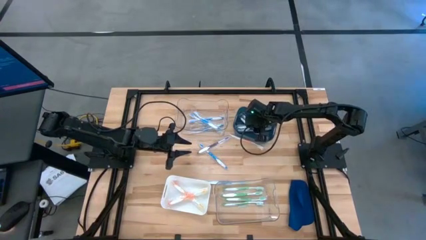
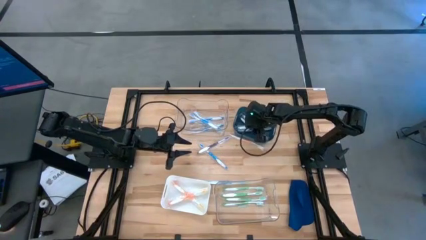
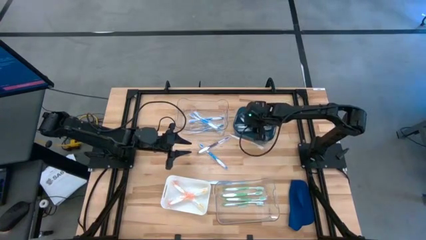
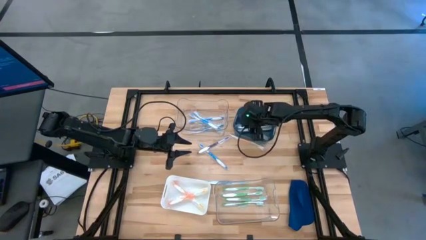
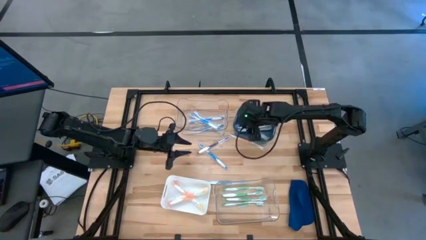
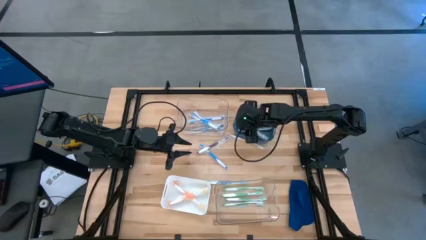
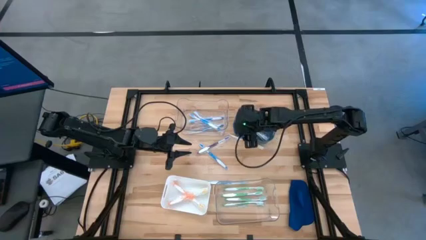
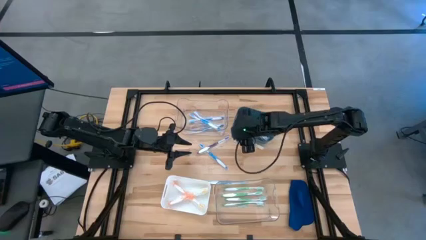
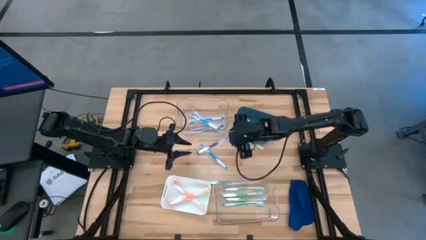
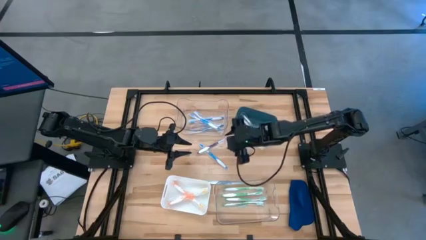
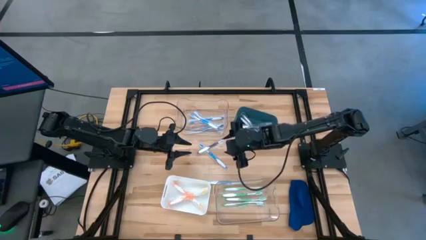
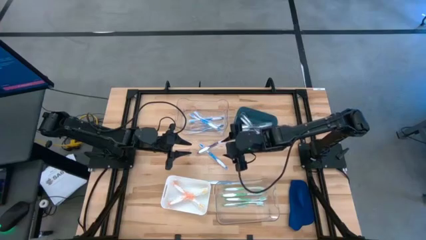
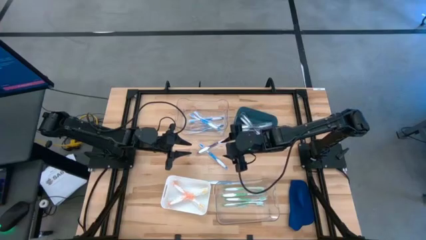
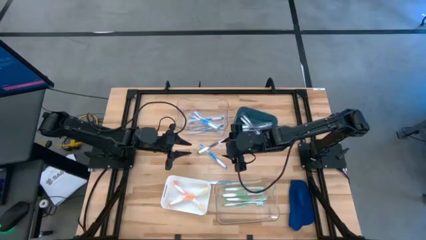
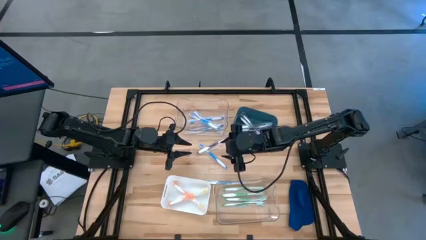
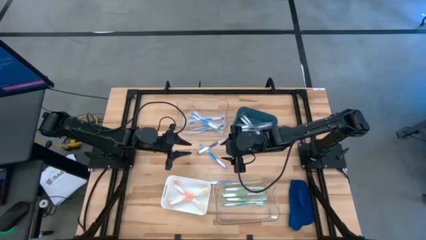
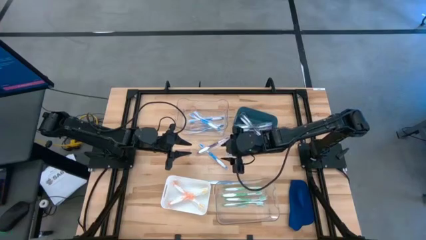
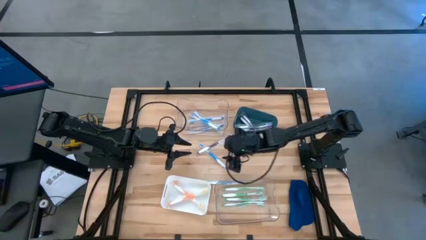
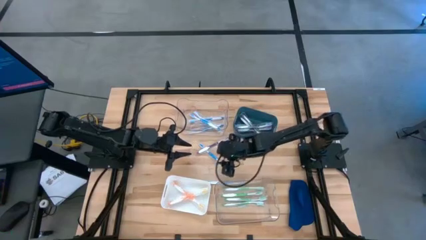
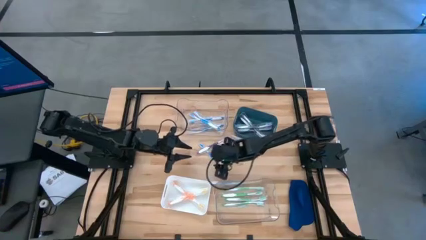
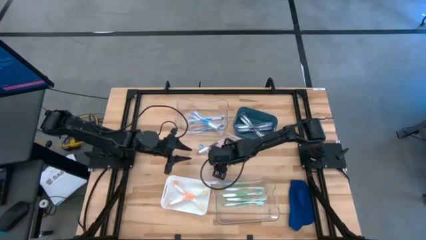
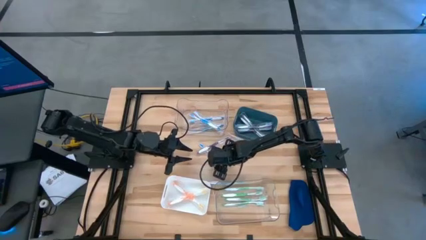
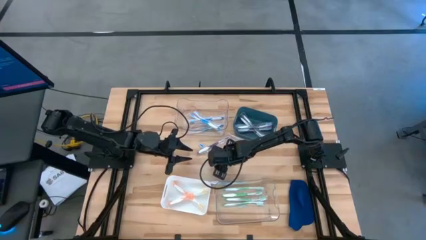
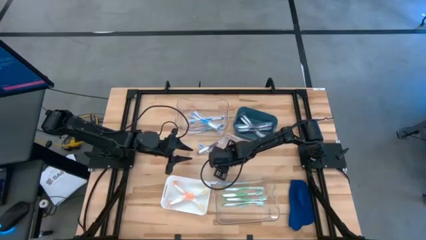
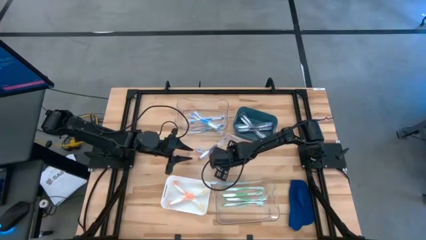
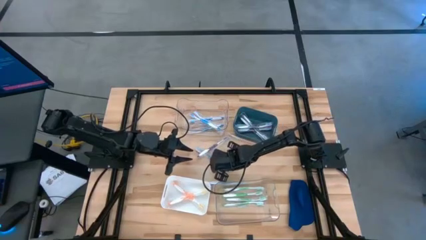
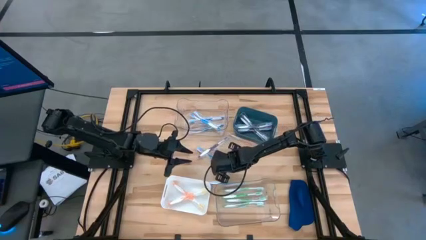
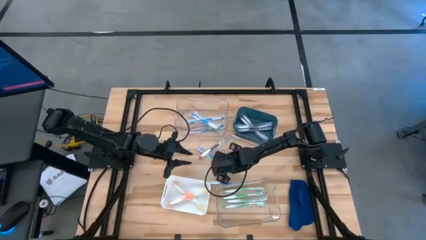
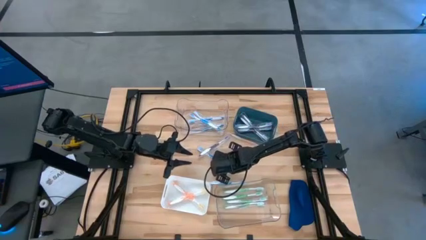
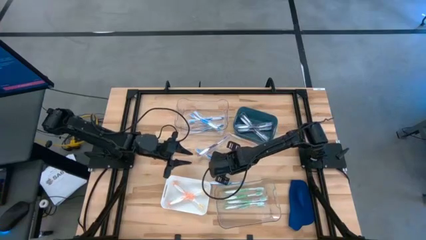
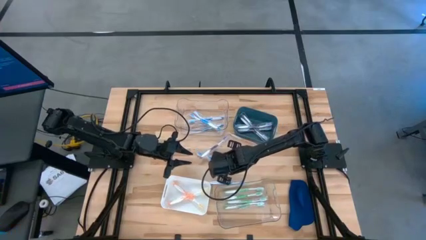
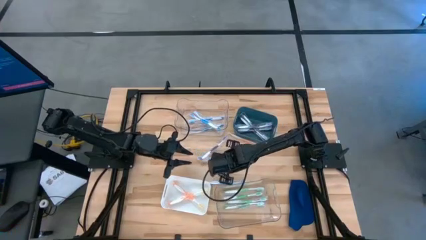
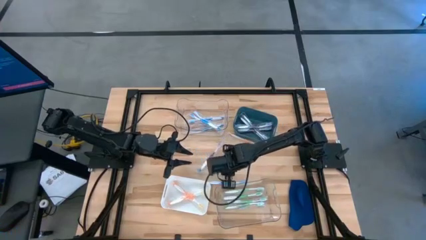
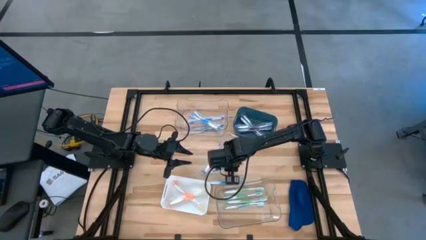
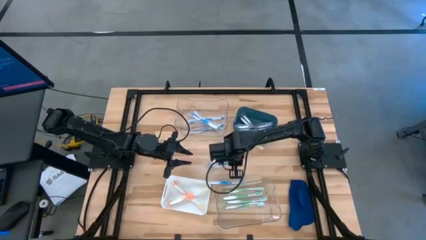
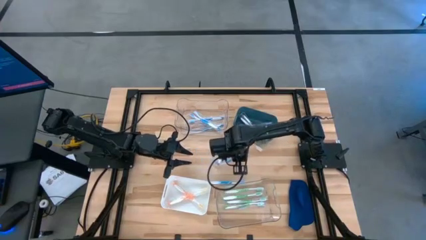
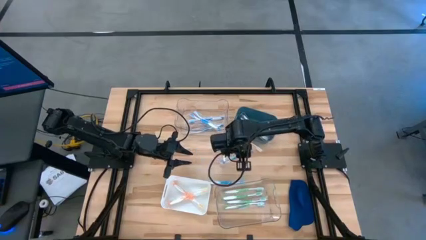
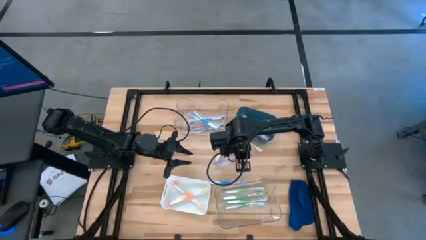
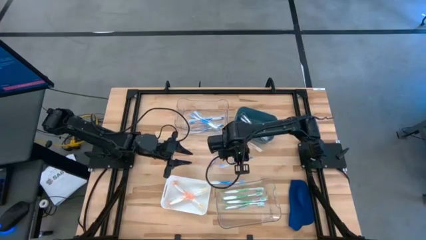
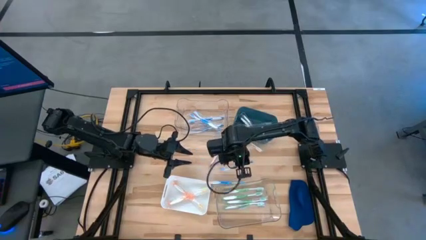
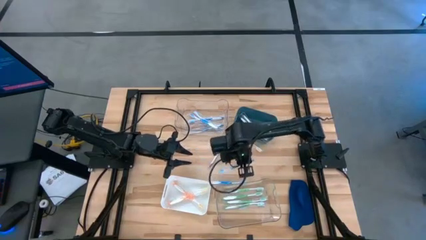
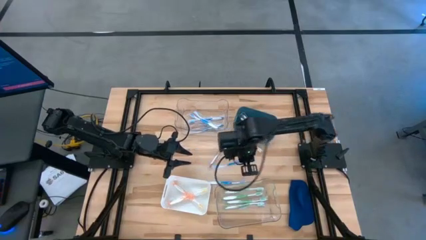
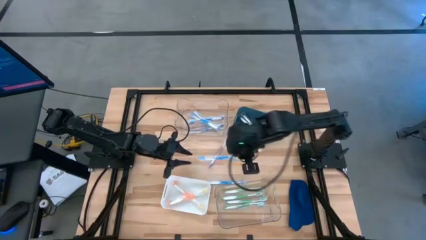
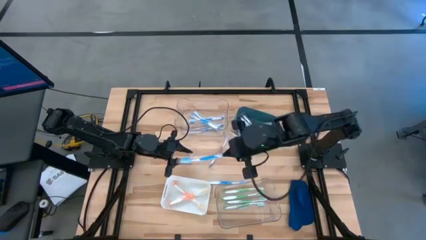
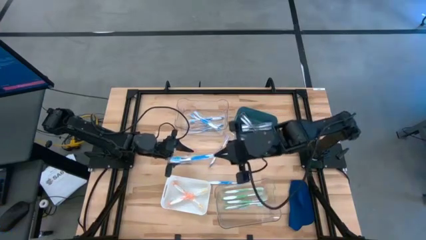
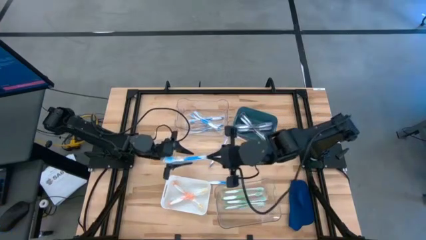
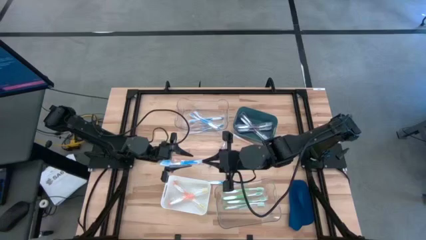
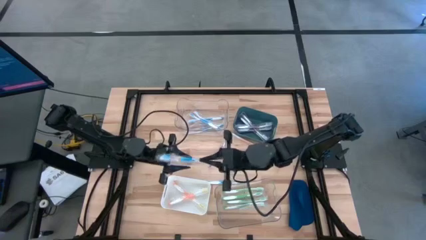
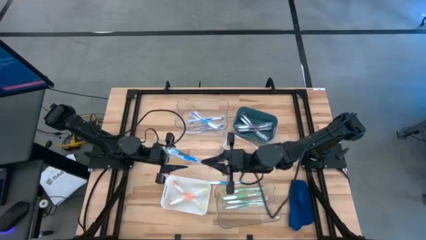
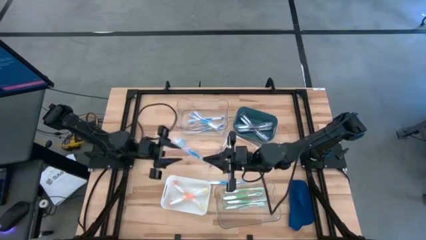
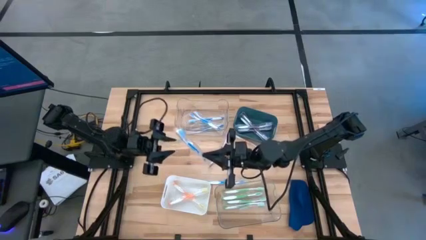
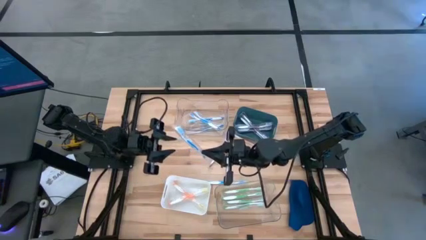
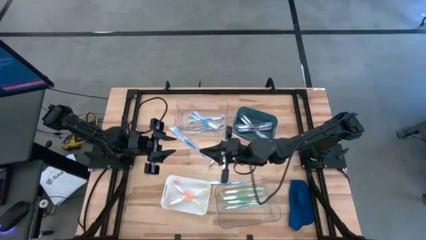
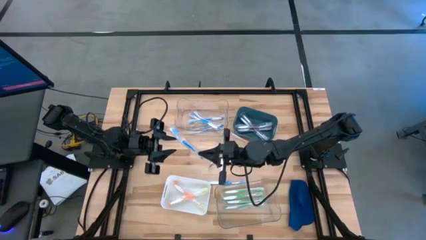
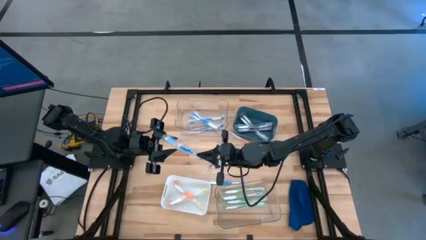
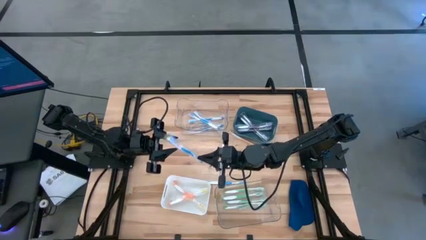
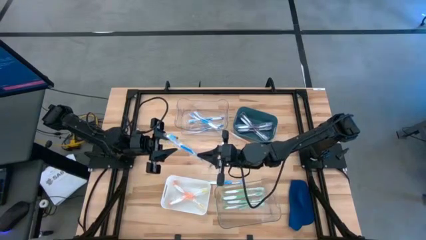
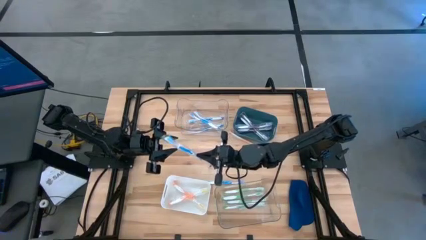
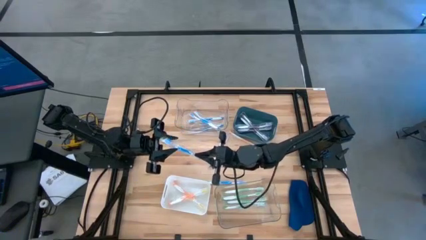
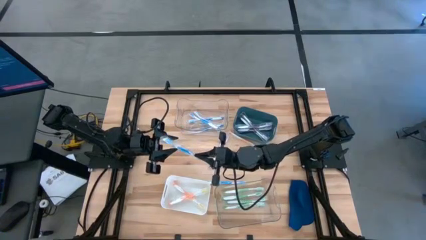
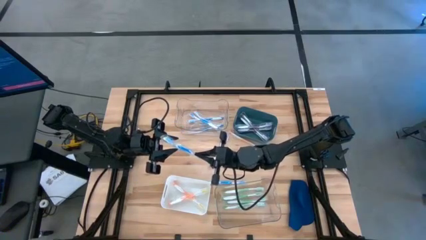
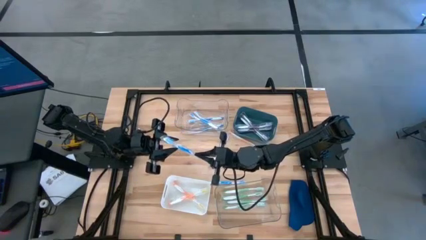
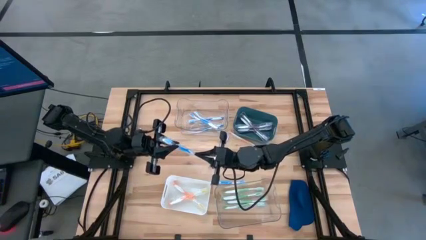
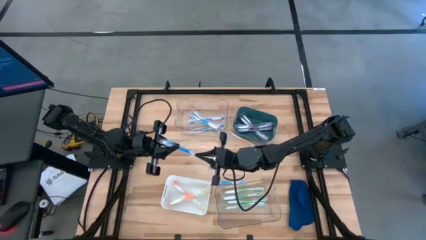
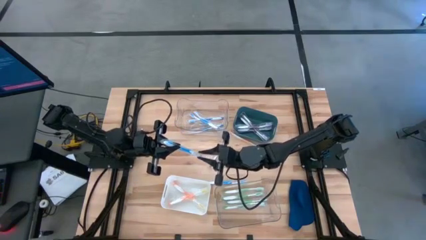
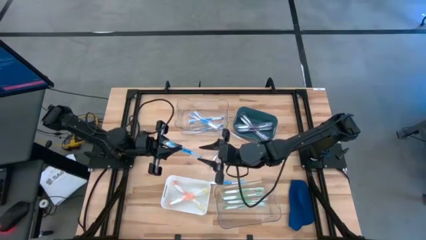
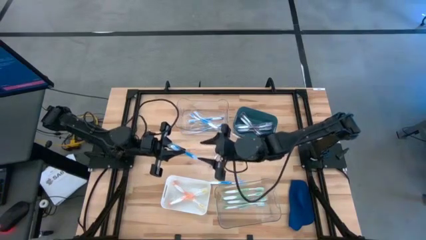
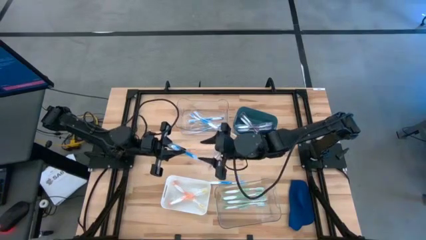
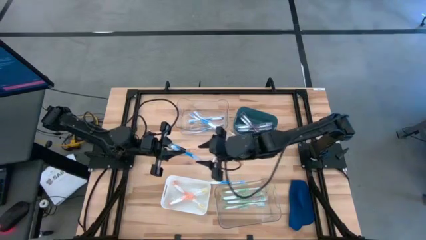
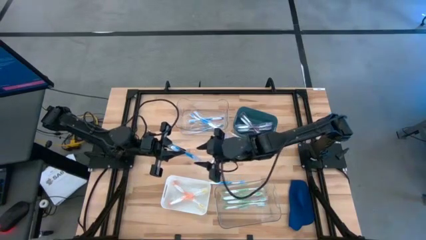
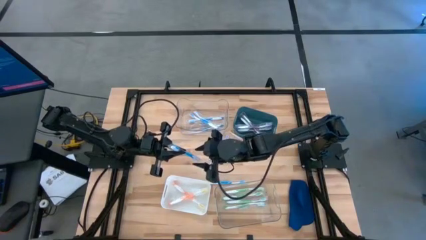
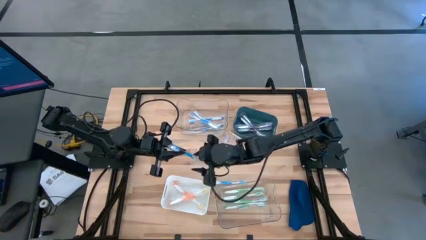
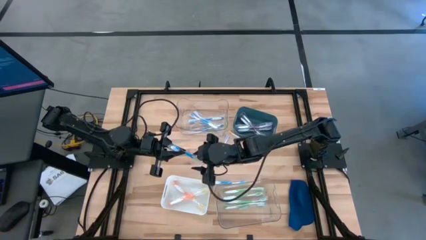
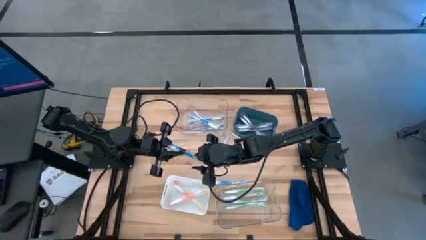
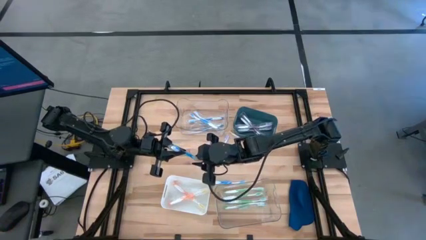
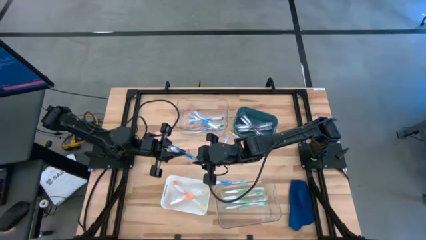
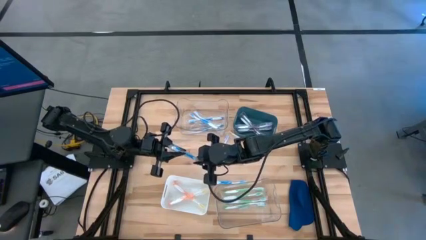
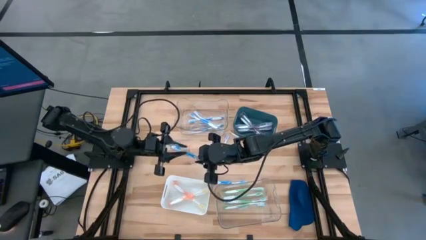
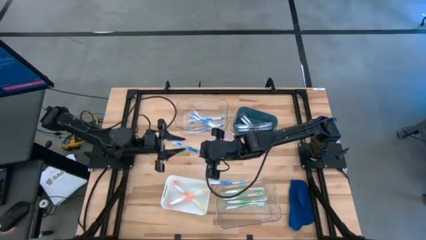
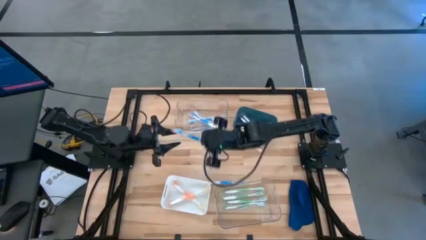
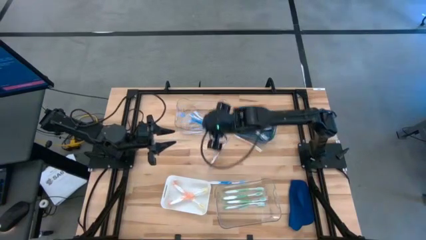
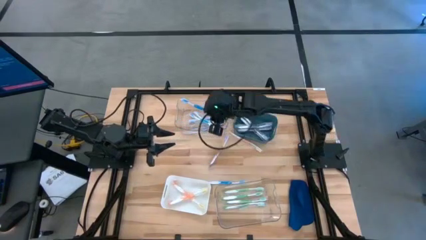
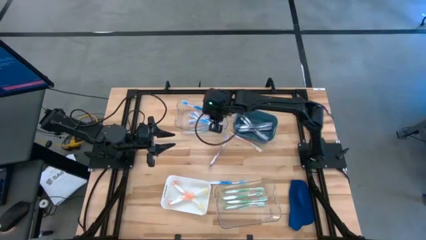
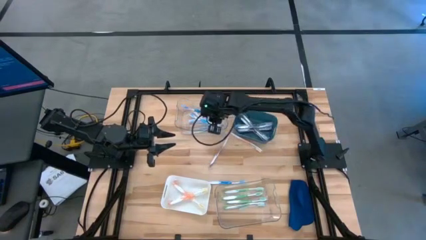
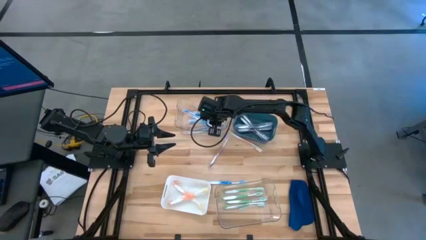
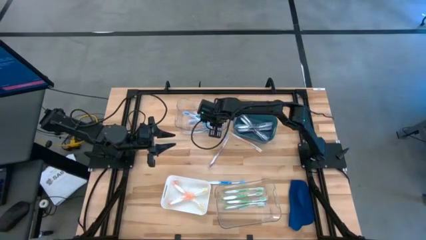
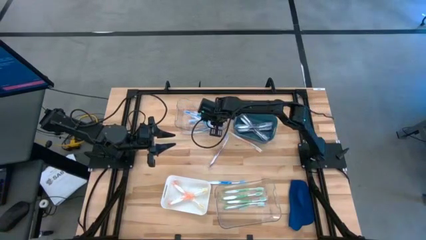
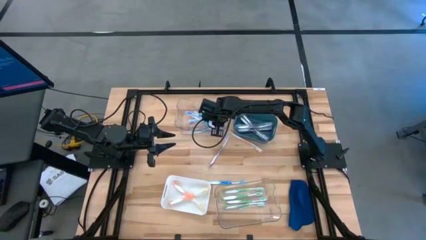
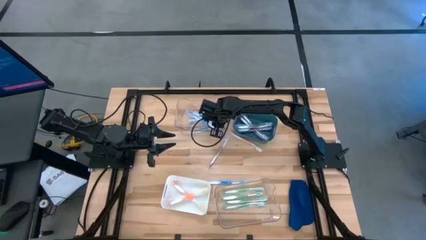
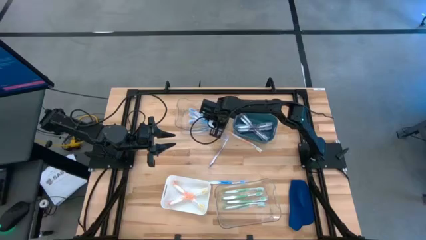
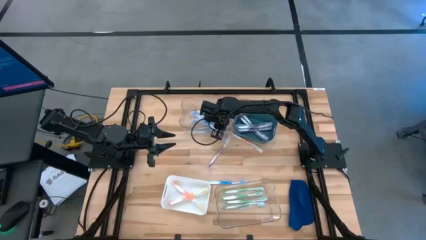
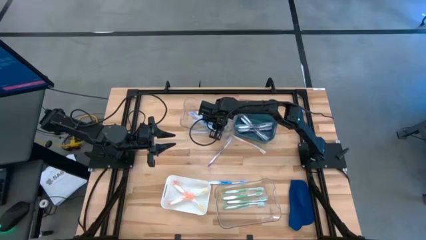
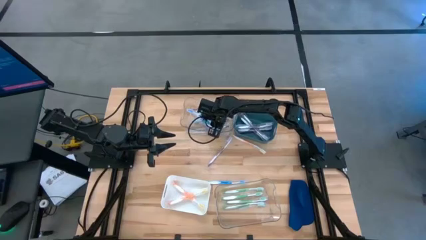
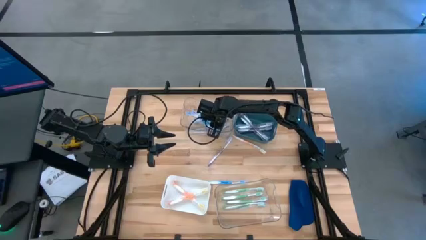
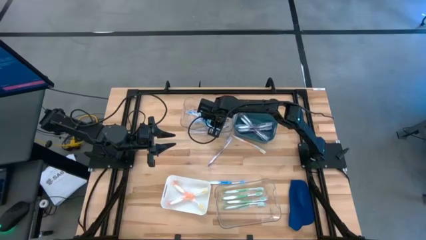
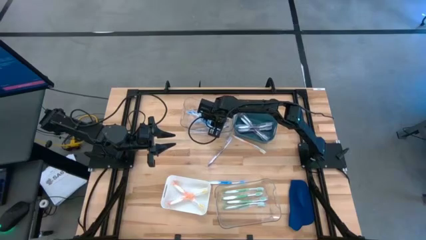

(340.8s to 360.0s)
Task: Pick & Place Toothbrushes
Put the blue toothbrush into the top transparent bin
